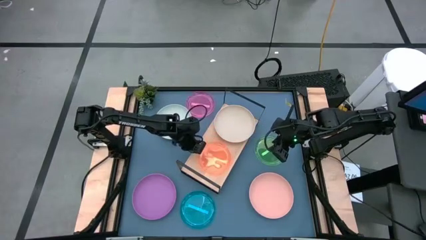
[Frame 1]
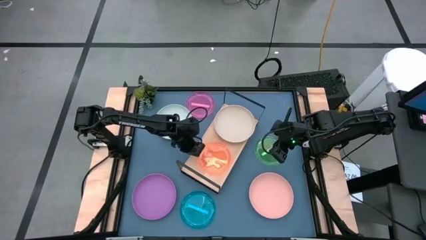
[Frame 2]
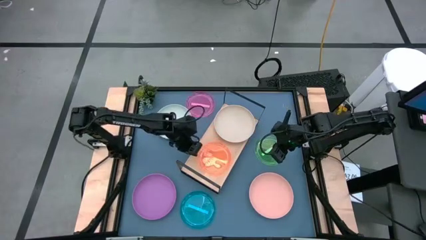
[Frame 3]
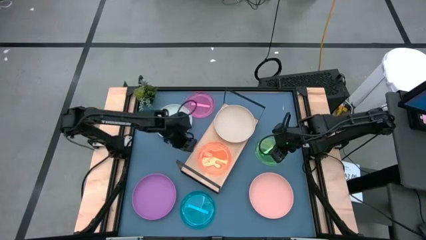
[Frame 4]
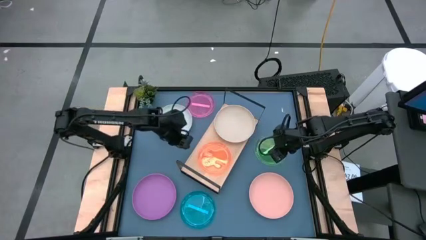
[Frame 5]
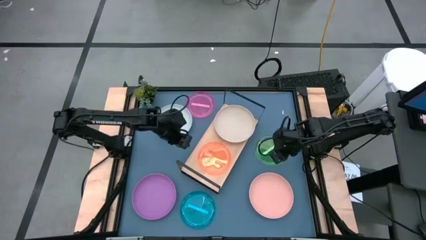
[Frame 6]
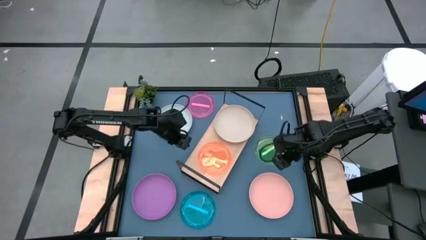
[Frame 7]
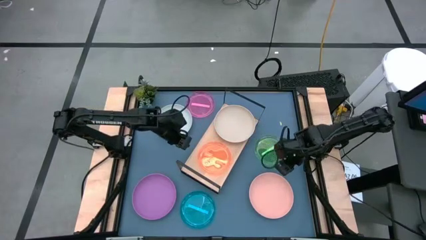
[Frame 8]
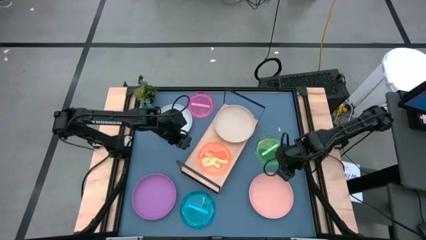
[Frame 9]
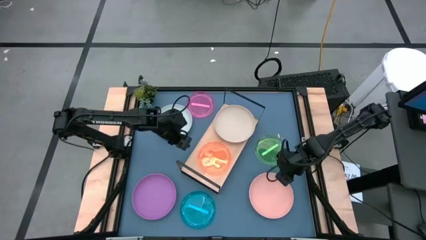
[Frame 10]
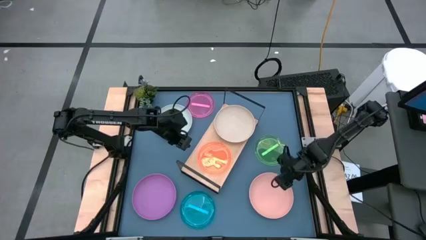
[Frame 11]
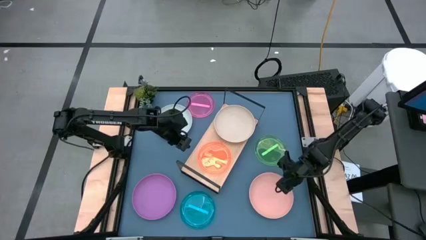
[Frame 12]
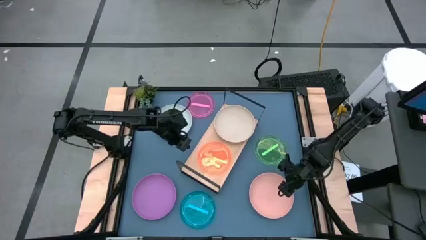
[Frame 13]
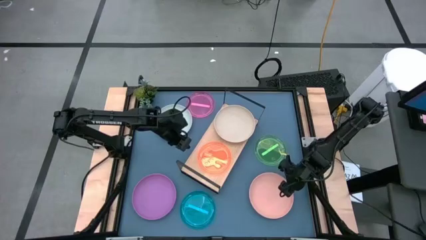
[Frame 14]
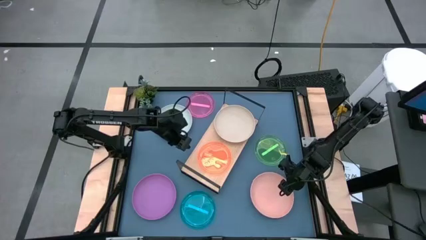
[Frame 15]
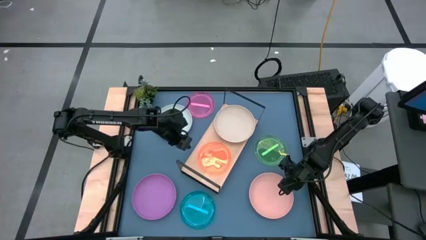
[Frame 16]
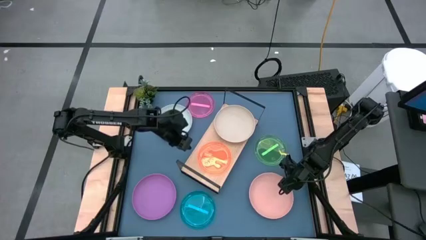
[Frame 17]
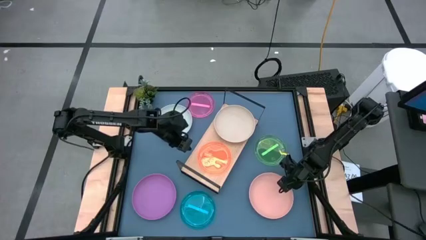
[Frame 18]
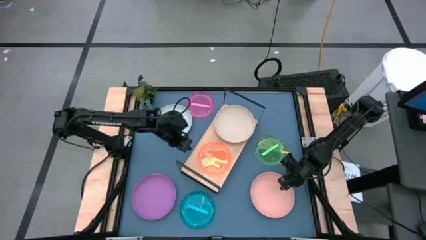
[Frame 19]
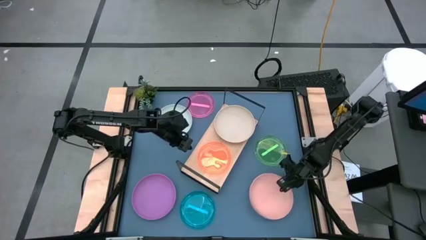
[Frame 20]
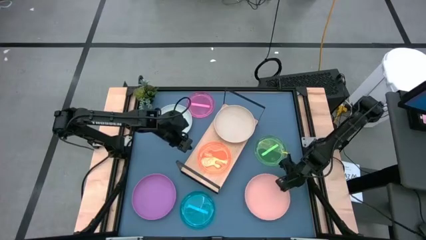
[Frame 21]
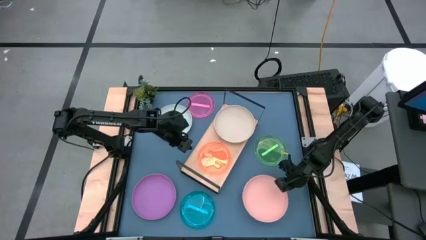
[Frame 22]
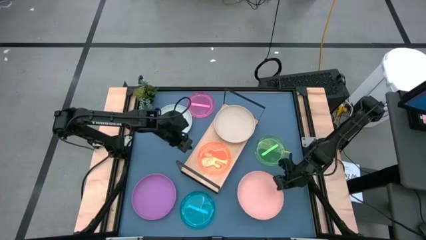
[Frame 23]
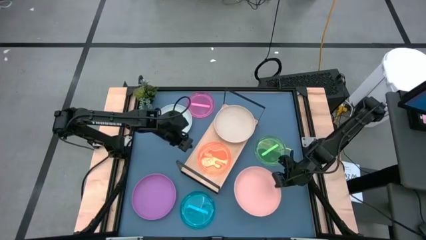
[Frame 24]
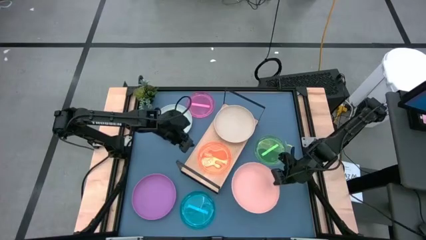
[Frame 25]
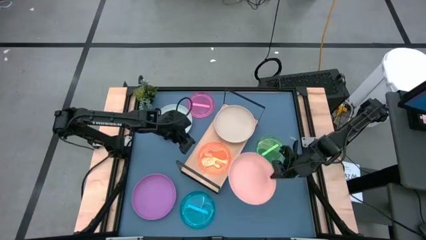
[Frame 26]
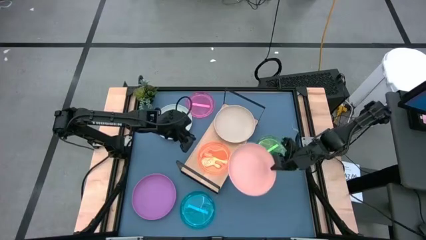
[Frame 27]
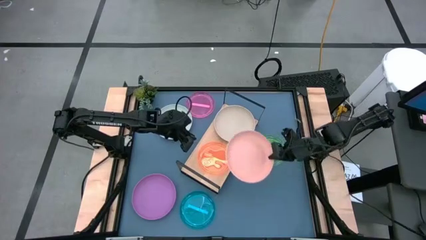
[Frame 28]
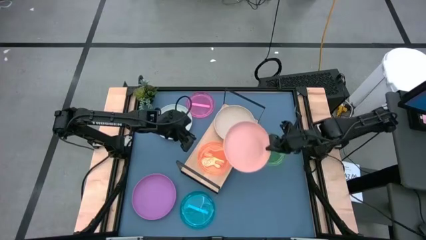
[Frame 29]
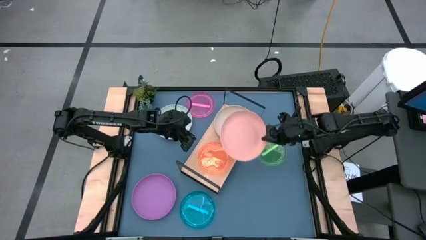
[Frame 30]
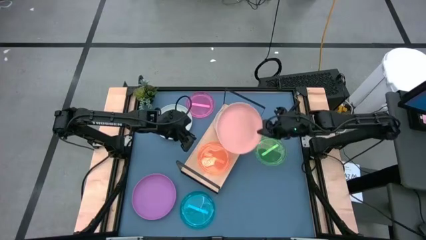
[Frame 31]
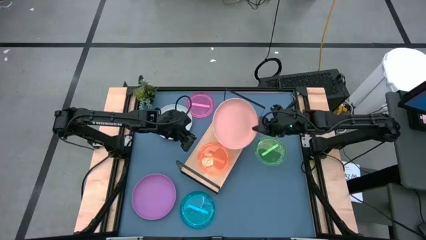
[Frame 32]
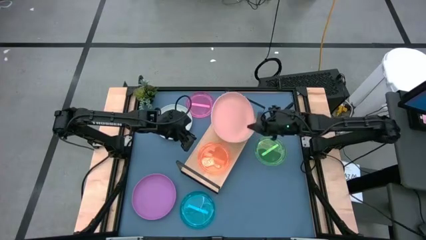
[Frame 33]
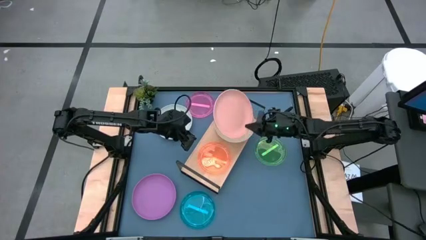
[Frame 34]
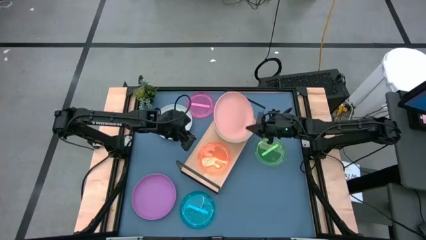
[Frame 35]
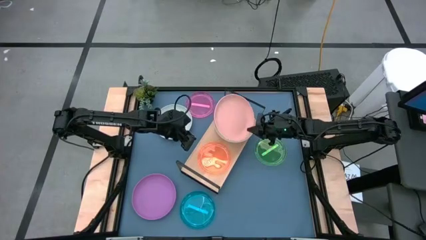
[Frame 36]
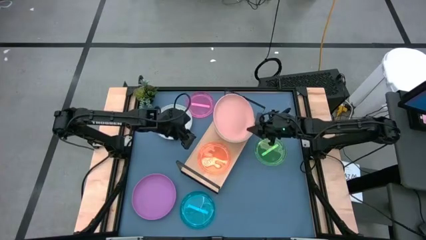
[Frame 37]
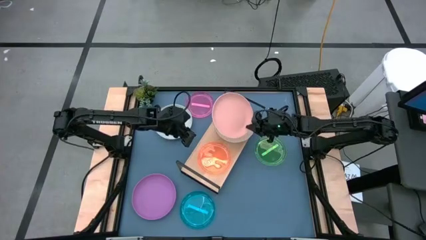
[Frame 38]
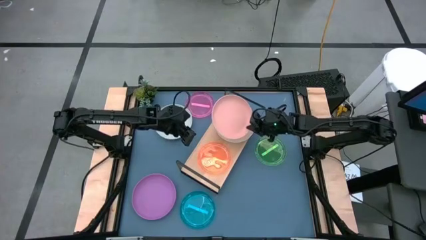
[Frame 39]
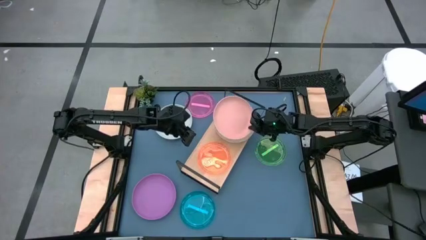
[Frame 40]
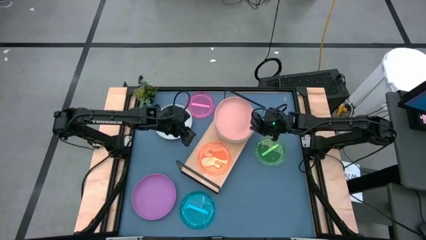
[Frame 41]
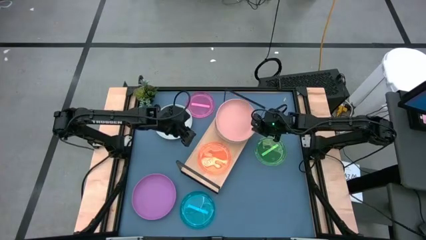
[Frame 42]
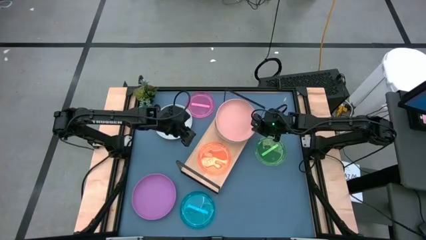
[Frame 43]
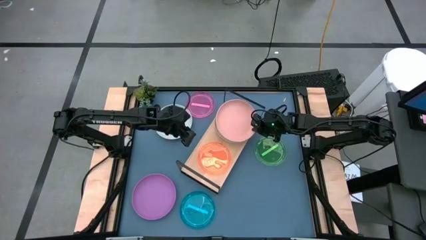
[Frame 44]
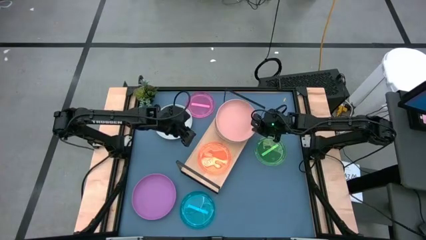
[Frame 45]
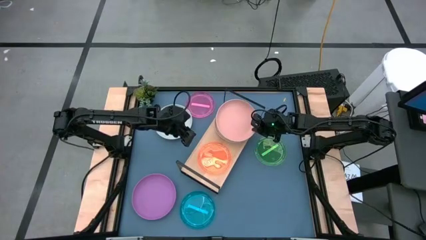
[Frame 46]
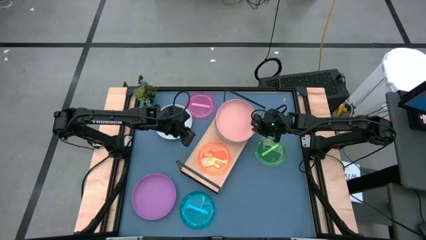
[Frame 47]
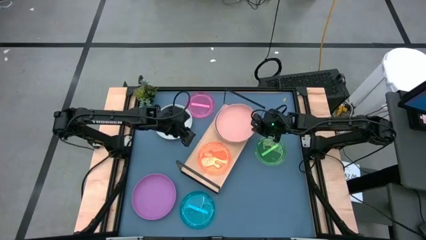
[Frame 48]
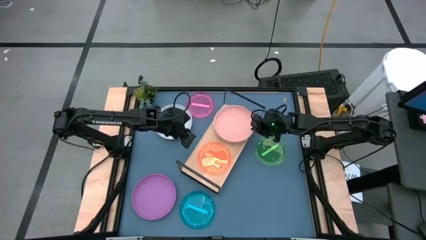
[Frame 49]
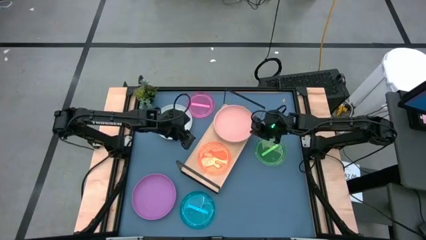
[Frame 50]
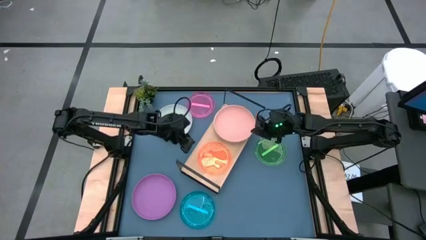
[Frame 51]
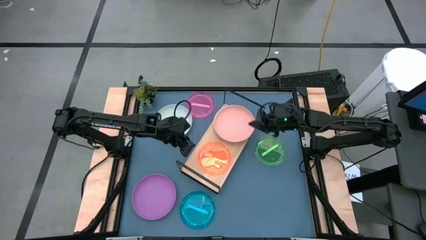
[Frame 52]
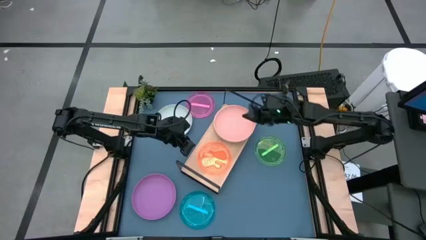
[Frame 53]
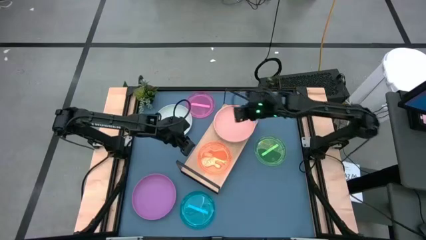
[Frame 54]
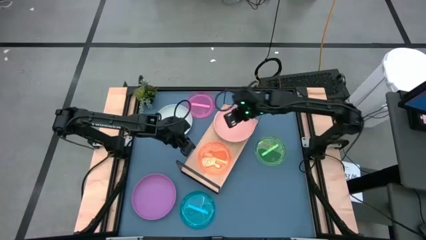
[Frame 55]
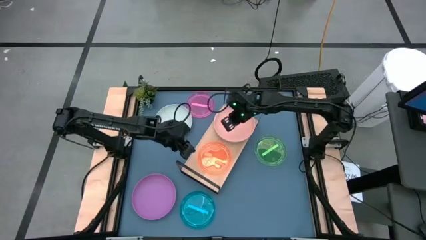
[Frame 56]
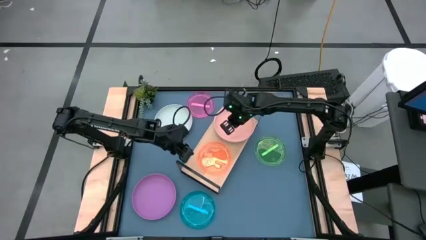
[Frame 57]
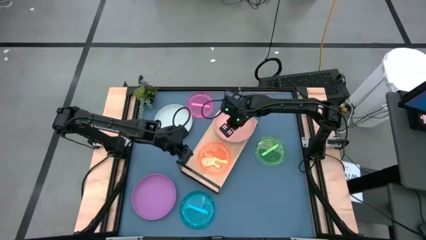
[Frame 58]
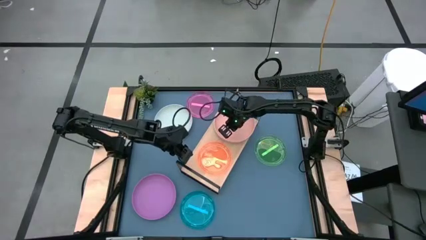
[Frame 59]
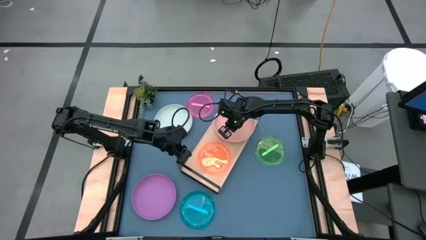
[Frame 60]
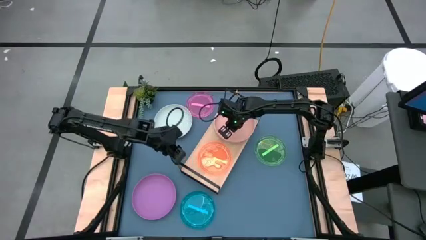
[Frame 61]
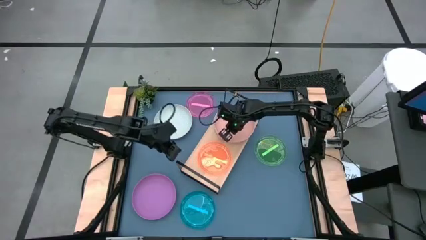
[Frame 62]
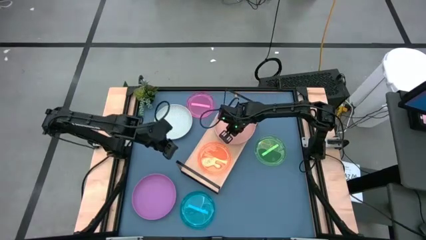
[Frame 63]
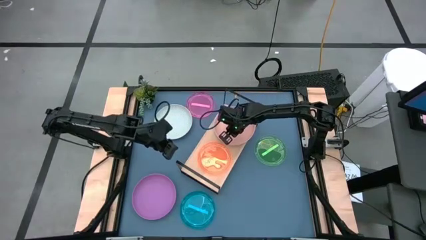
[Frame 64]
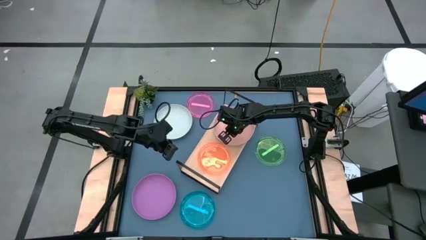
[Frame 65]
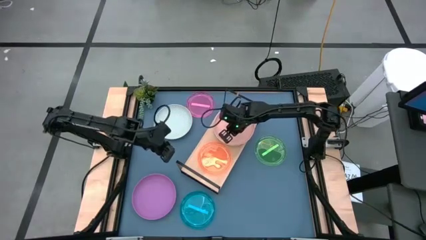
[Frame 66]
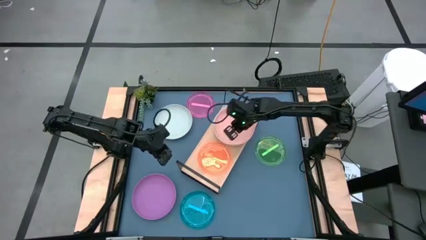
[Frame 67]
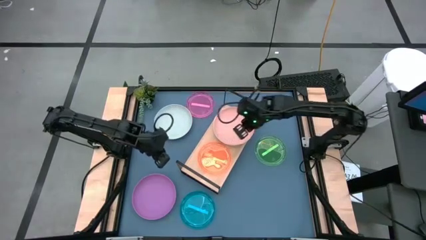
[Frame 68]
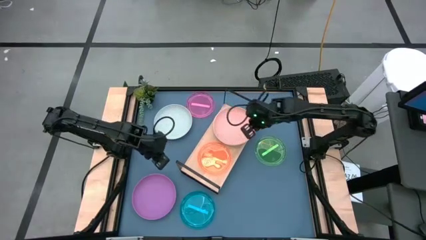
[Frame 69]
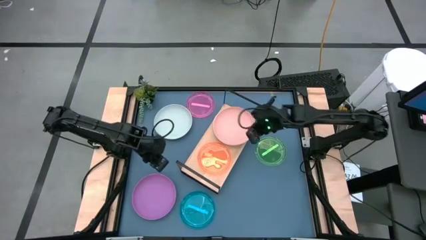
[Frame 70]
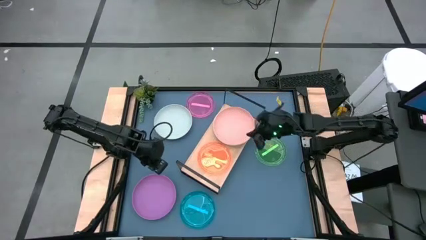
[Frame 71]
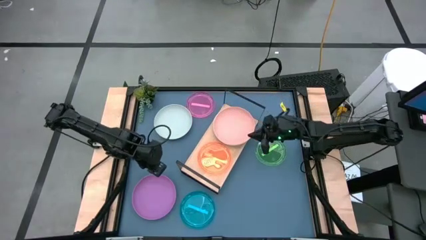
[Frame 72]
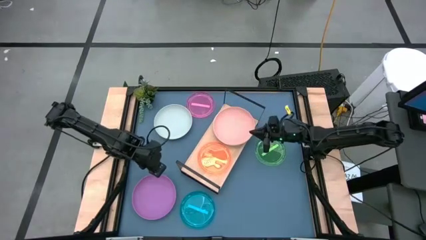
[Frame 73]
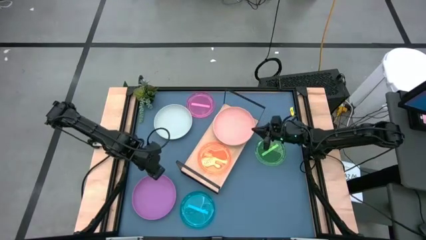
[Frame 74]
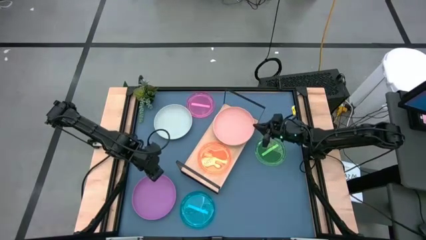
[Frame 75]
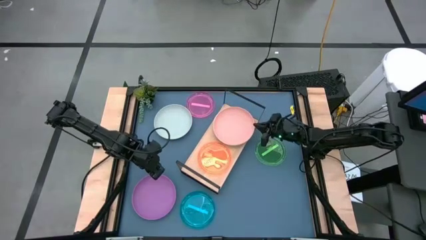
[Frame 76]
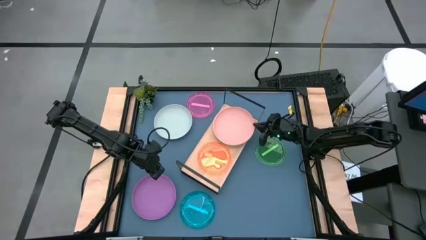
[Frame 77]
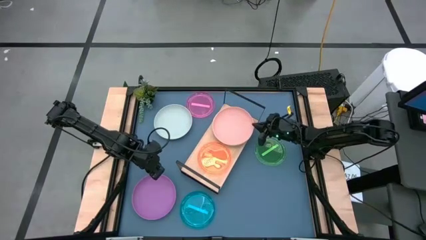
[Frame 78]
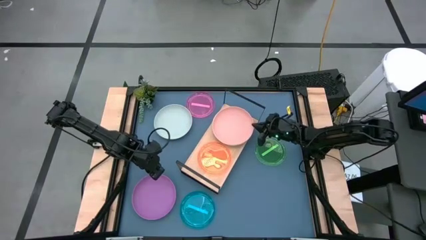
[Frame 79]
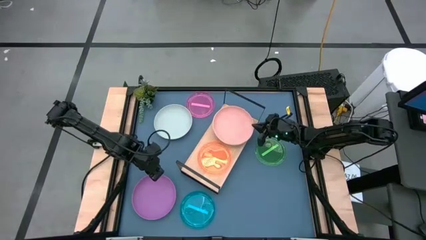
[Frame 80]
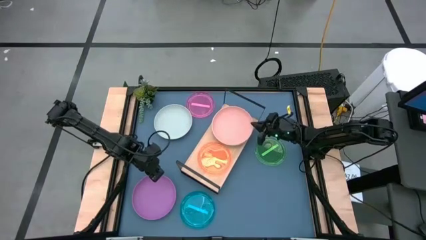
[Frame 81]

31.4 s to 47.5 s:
Task: Place and stack plates onto a shelf
Stack the light pink plate on top of the gray plate on the shelf
